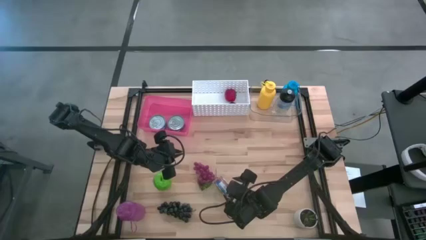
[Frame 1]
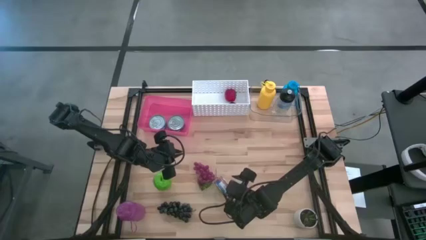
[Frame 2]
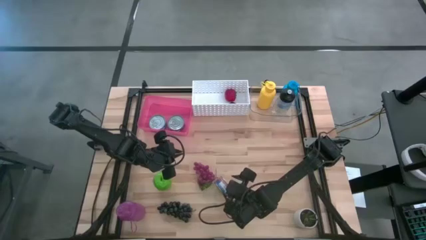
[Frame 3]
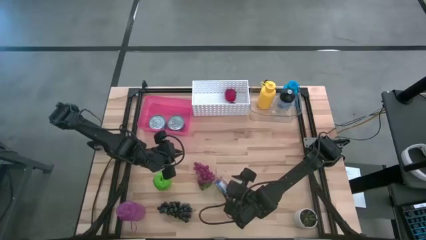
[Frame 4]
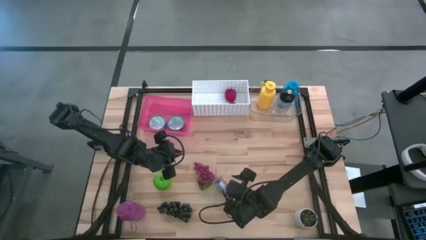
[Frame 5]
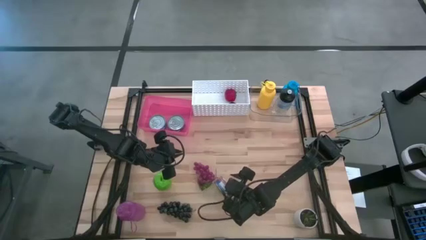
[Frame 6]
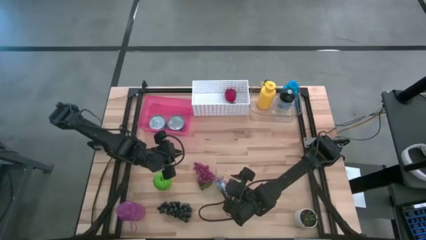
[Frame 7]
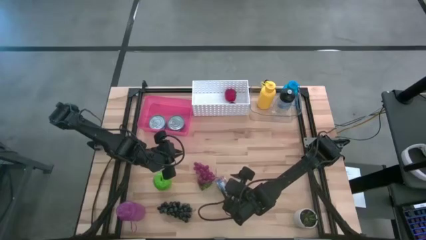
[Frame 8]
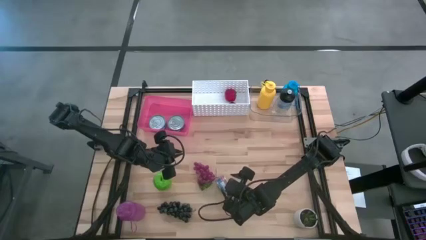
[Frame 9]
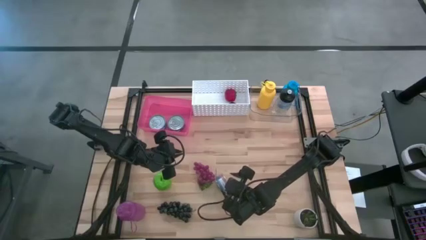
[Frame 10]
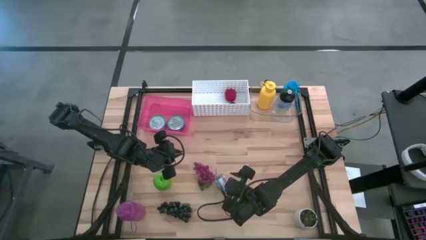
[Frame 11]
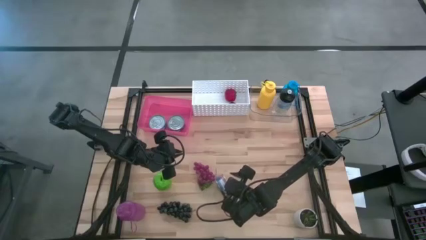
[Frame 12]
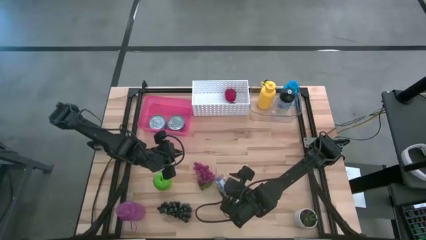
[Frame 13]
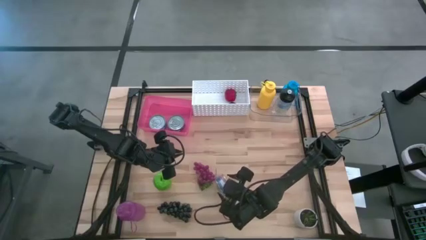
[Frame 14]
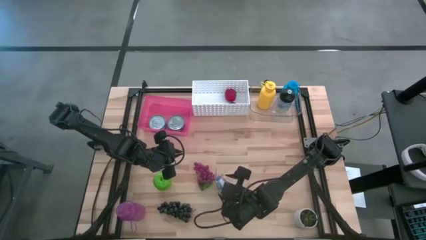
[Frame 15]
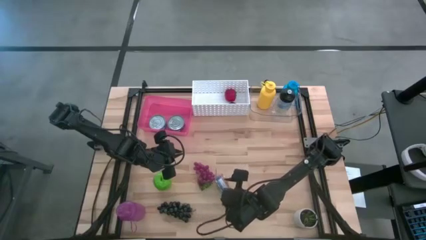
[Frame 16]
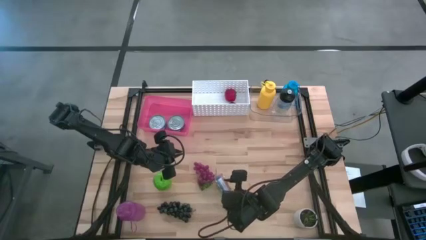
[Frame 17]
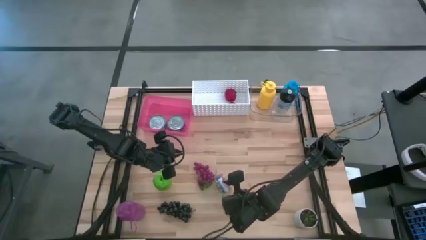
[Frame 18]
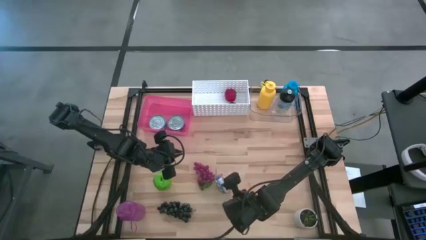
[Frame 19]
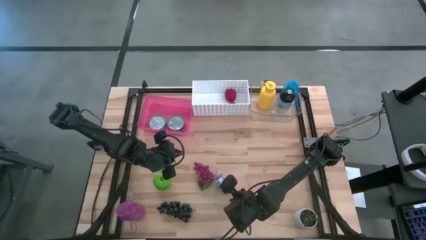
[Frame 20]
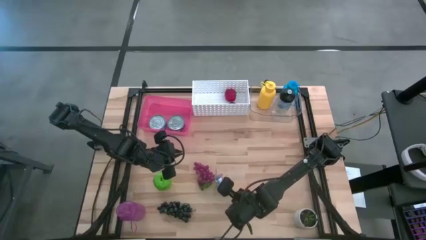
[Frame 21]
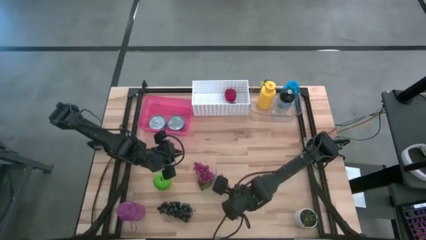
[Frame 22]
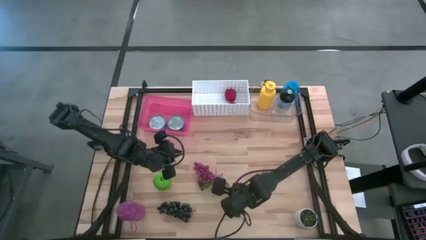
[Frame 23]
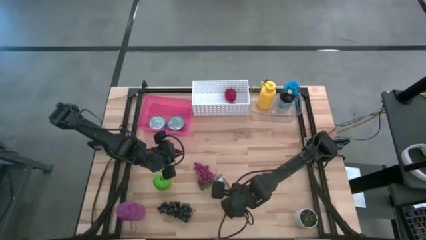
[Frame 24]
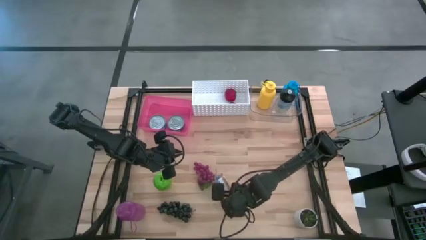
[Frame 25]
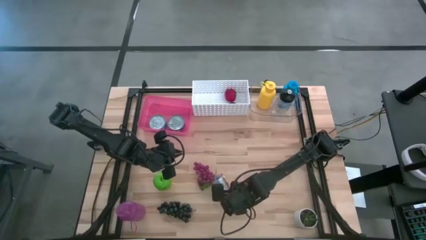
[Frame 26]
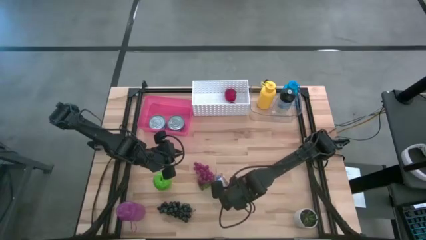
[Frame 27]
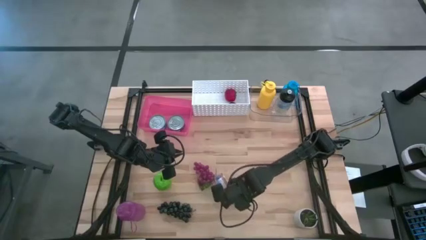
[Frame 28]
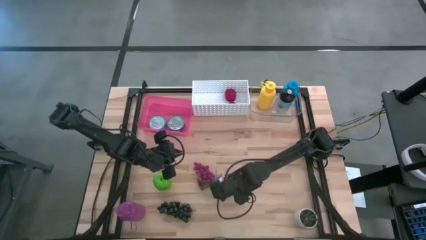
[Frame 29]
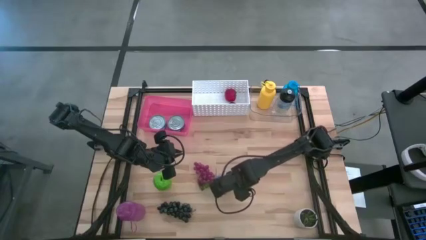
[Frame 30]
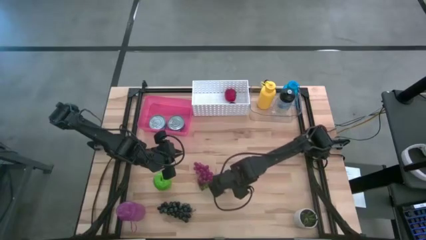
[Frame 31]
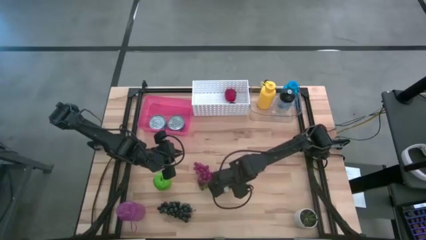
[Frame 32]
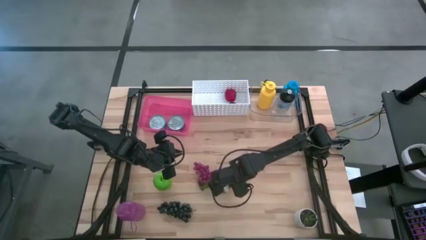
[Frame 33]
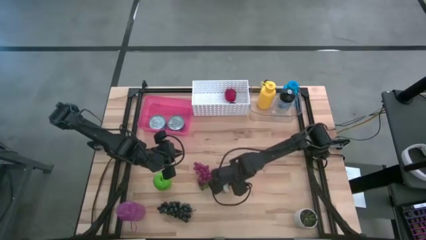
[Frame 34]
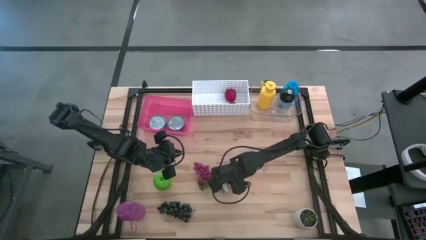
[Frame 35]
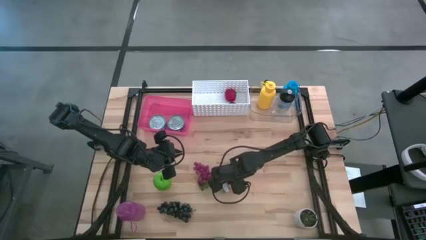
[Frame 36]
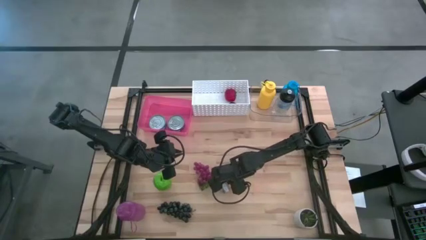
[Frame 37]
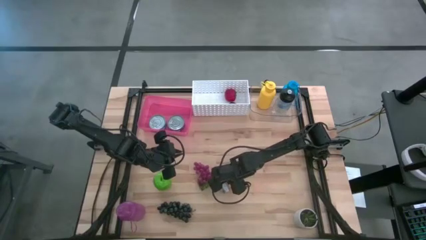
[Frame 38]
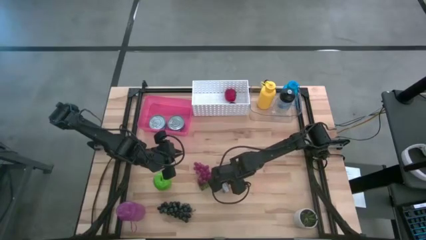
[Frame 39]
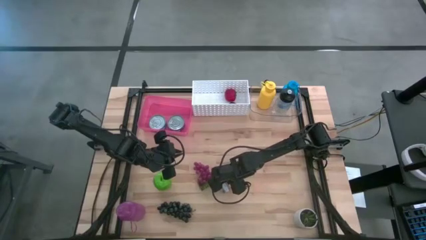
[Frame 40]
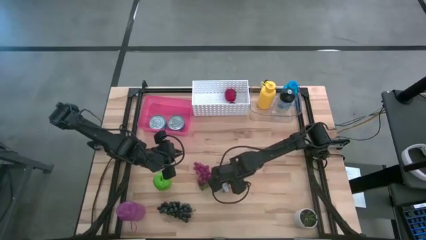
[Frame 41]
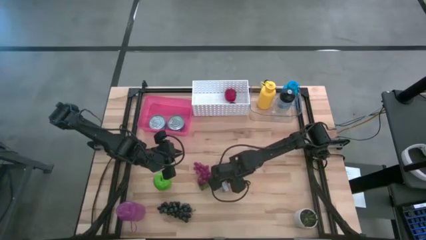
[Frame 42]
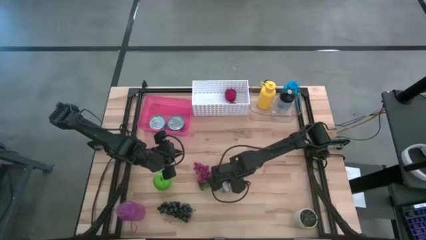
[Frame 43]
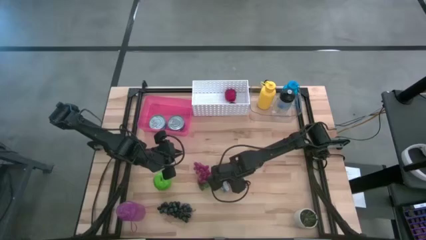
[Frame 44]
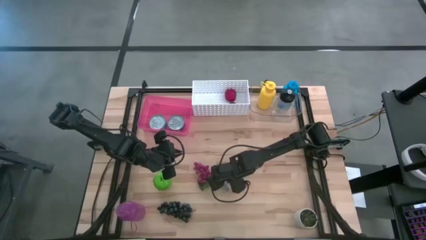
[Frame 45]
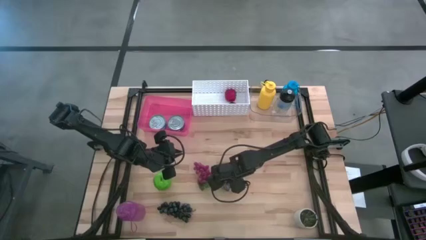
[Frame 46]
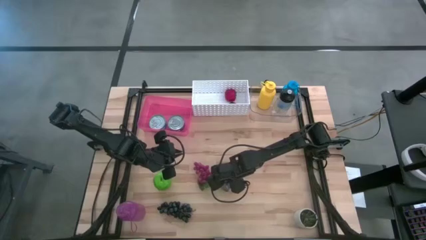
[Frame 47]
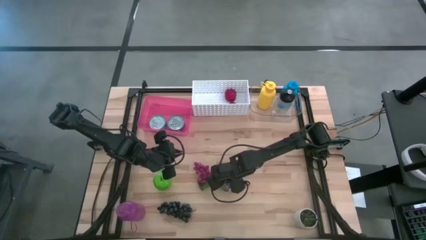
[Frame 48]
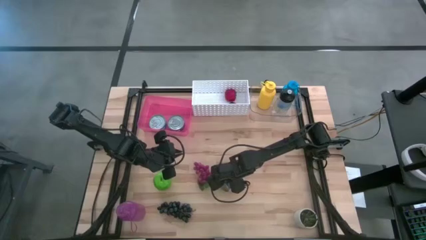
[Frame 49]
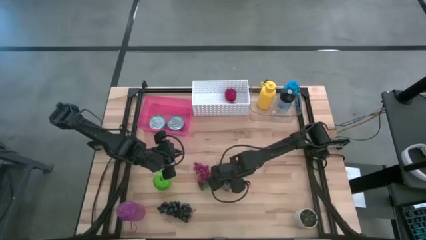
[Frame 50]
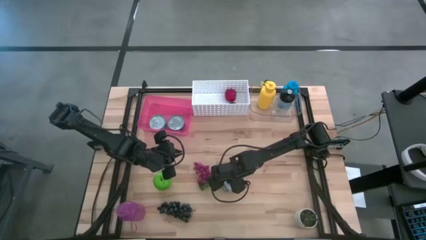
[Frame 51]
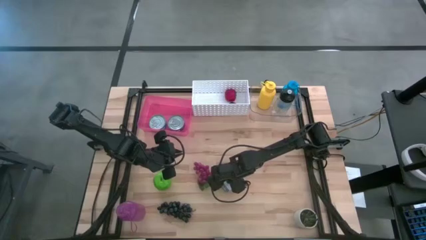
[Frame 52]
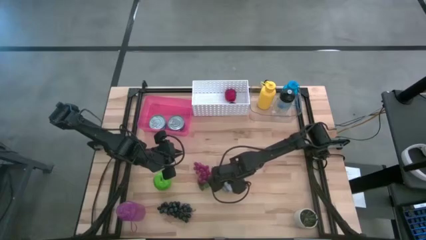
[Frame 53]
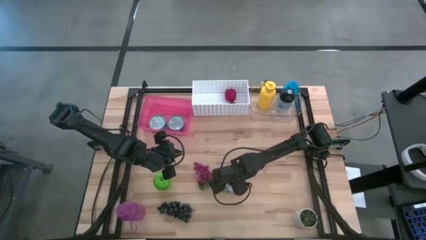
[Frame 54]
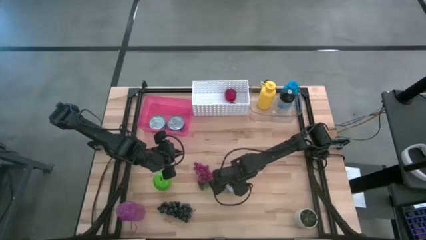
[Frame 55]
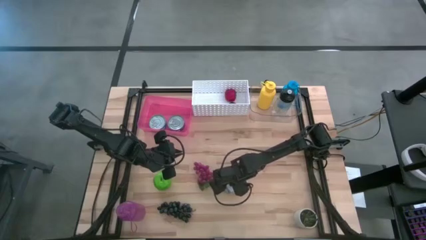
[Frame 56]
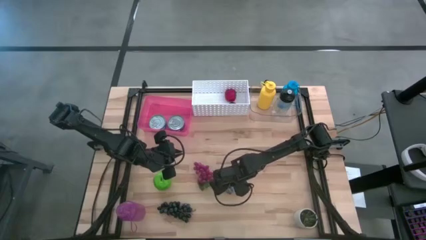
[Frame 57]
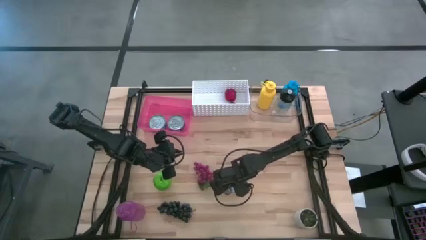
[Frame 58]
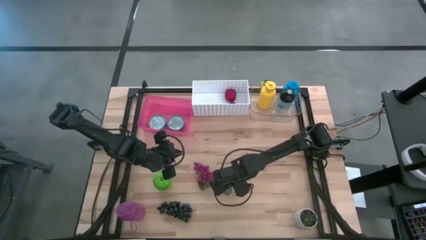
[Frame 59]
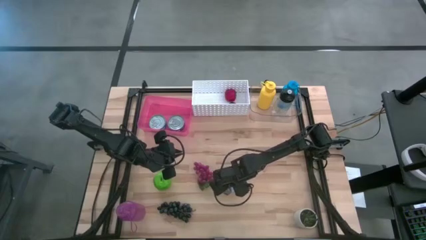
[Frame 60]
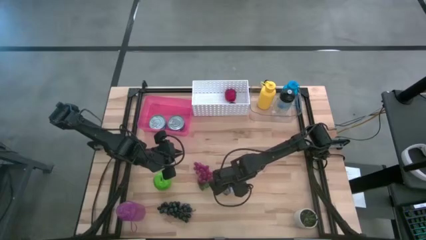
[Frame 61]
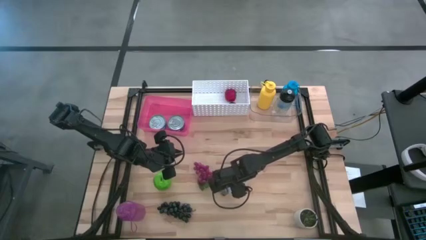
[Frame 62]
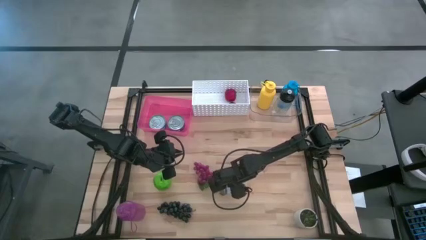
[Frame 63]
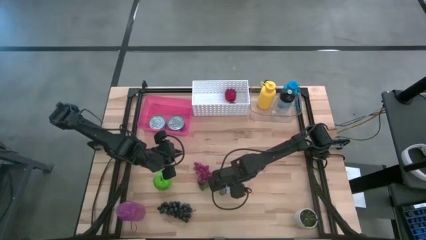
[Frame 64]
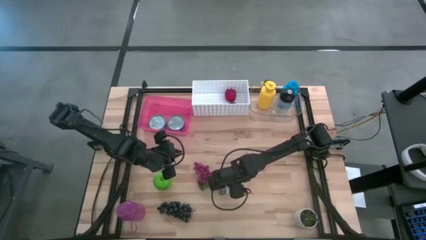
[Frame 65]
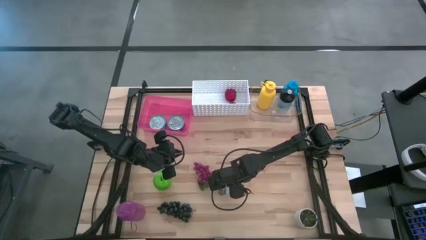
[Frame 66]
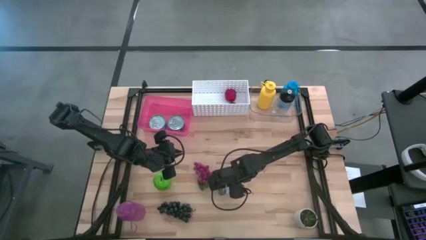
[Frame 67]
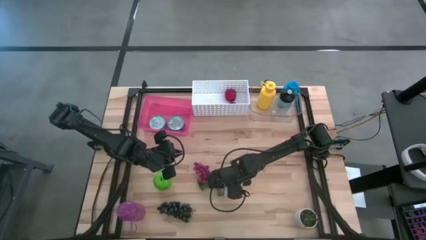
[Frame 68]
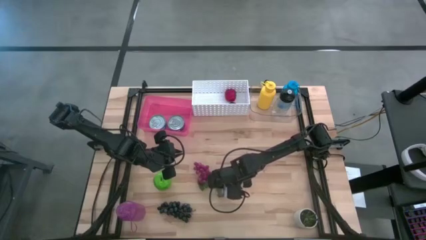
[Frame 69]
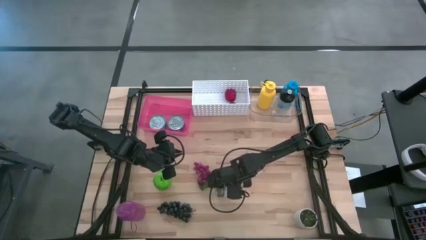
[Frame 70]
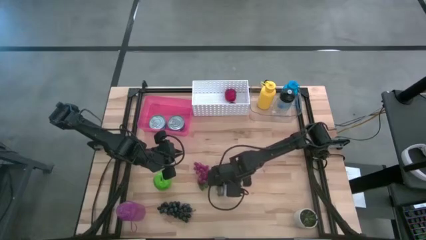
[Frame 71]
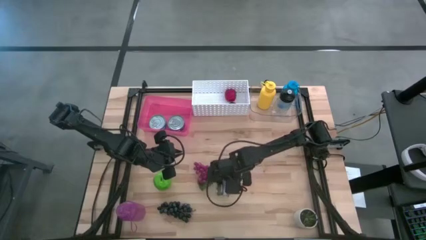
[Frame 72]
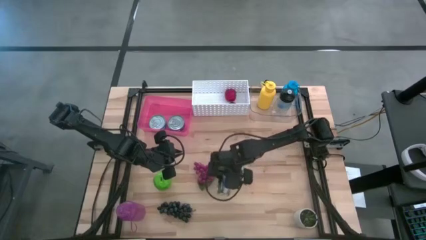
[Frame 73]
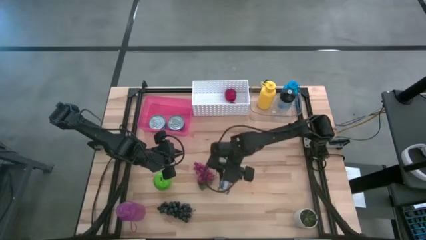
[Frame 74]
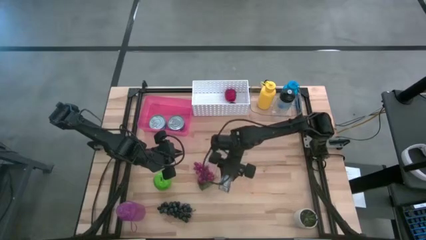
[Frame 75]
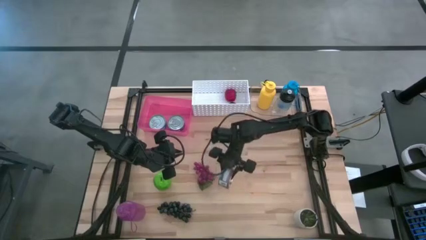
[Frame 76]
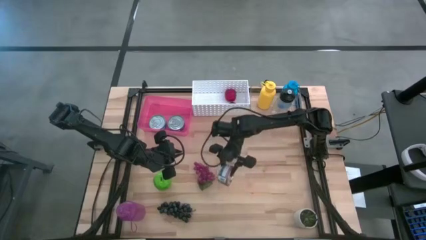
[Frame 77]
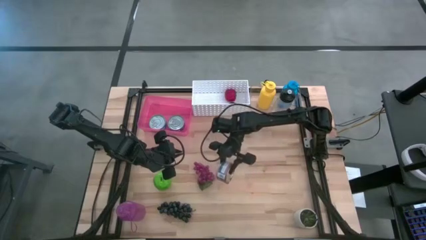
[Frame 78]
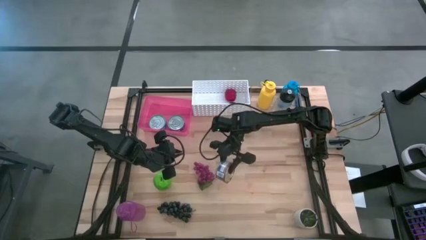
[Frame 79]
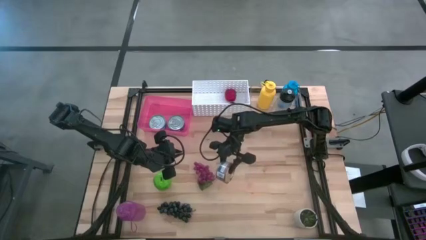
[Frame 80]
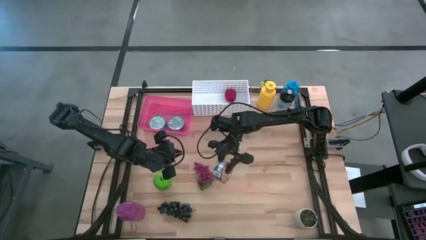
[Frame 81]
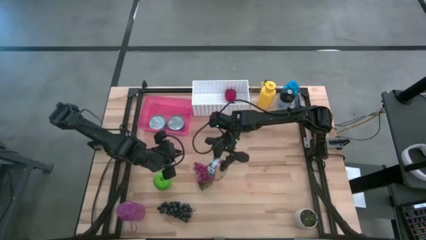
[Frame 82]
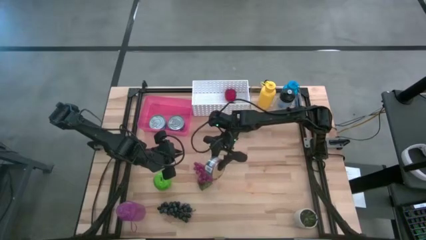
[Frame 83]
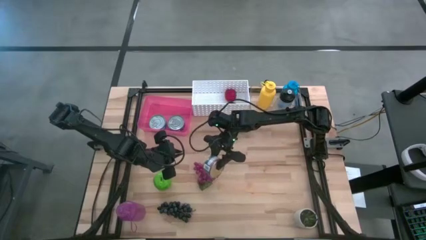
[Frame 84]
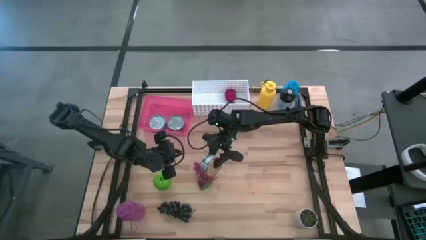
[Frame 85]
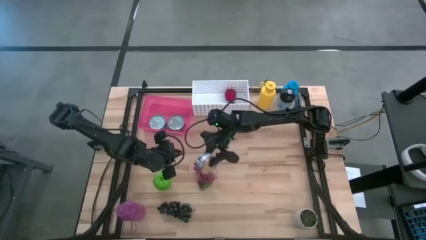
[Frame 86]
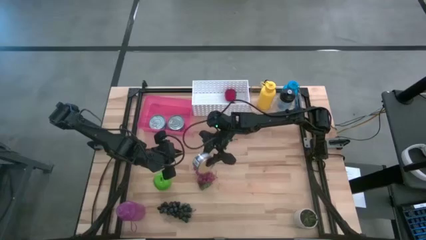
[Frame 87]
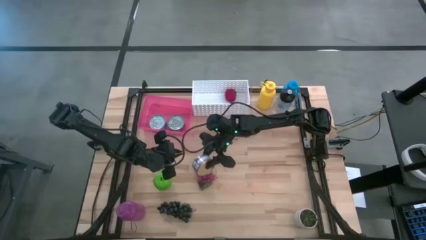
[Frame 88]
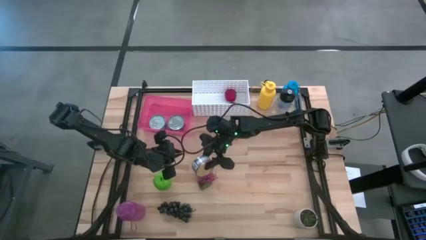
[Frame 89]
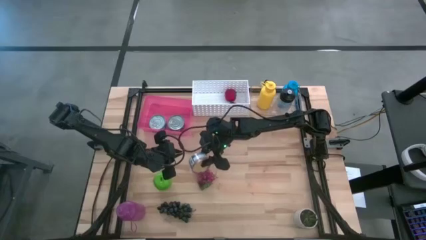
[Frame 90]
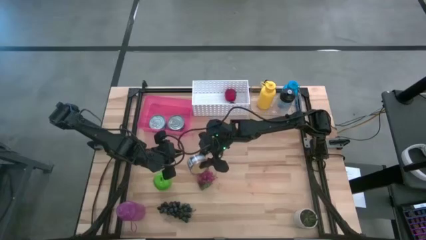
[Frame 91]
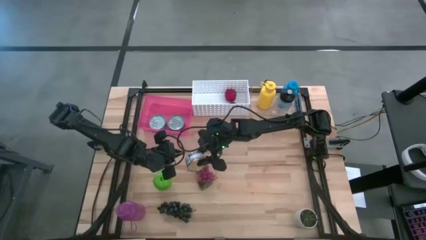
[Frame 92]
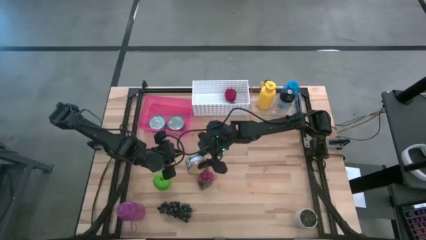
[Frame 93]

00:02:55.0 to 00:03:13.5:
Task: Pick & Place Food Item
Put the blue pink tuna can into the pink bin
